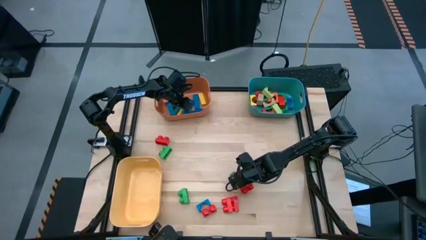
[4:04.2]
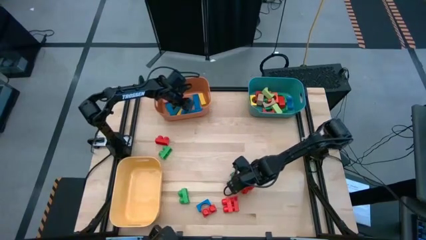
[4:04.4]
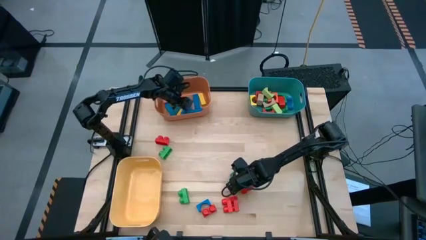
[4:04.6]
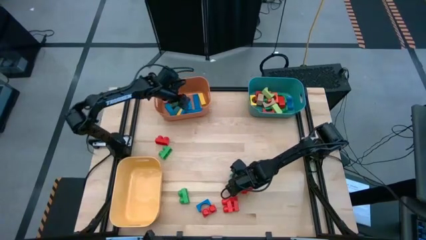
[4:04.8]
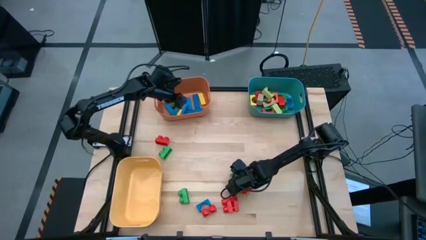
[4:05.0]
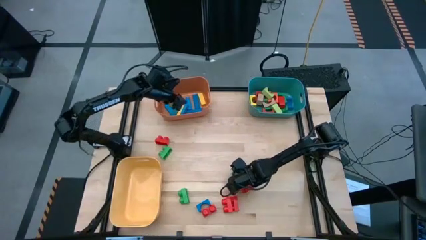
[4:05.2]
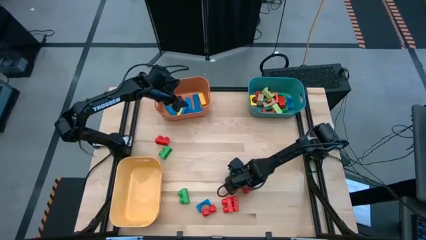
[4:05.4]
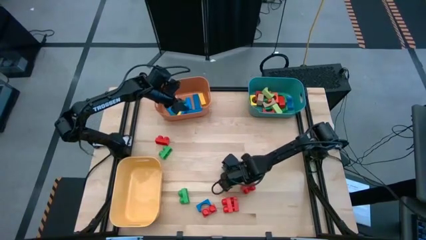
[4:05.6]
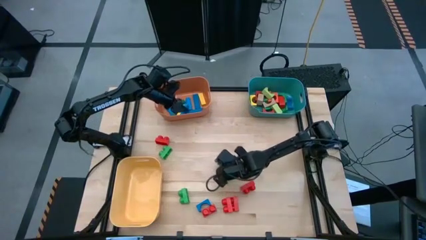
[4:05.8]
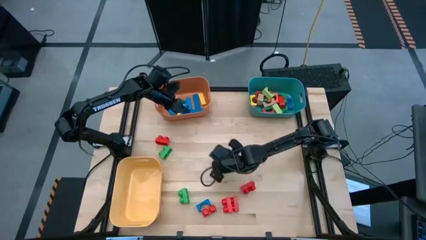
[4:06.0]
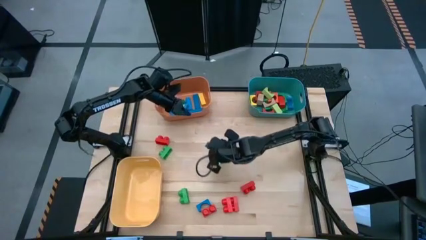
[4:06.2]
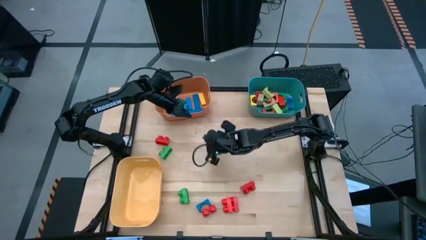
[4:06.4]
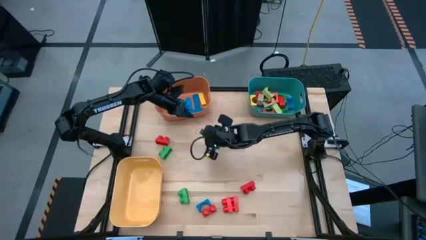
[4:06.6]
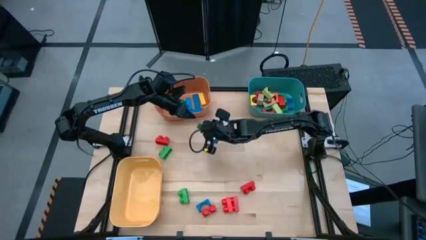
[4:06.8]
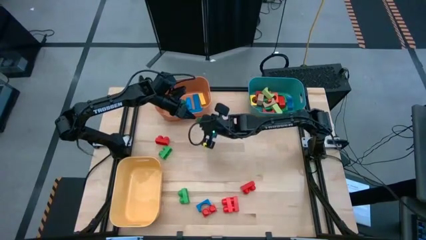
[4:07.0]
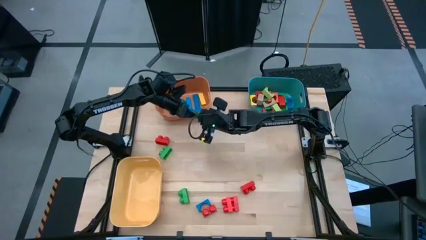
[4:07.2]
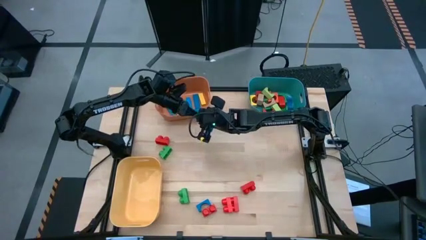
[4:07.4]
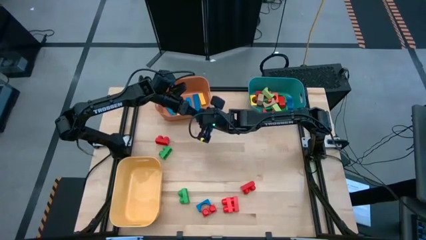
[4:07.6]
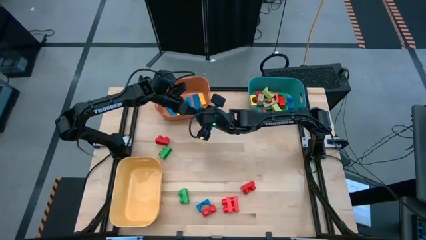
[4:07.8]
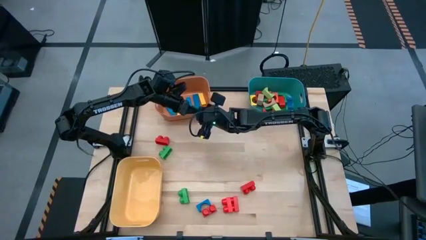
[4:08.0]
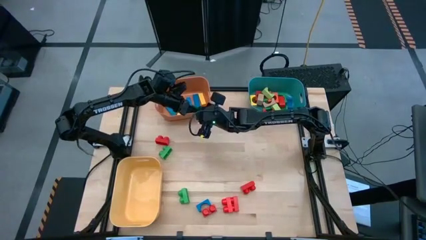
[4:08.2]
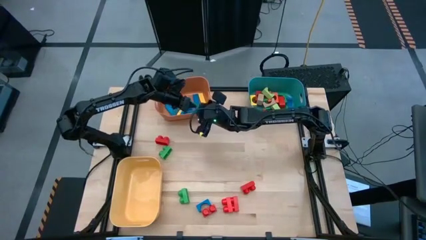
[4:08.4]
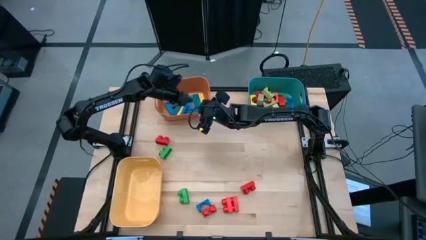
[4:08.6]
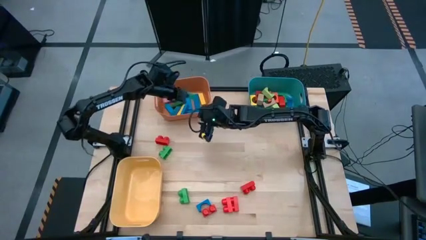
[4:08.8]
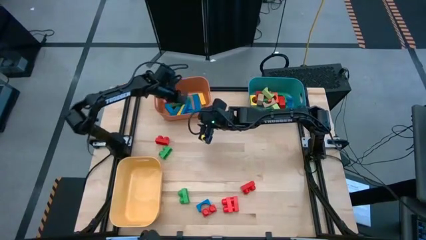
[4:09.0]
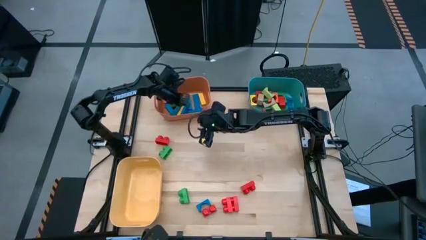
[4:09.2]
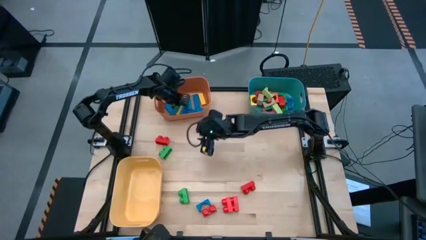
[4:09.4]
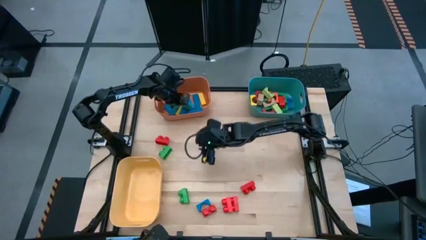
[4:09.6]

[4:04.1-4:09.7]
Task: Sort blocks by size
Put the green rectangular block into the orange bin

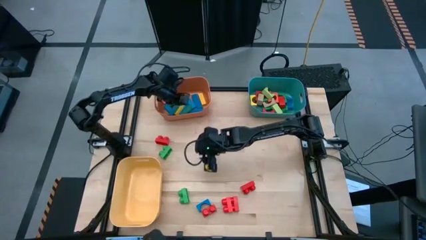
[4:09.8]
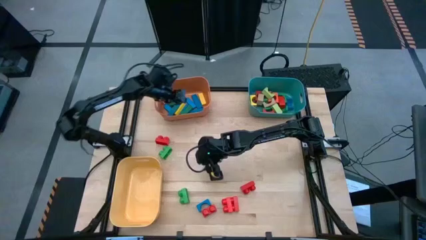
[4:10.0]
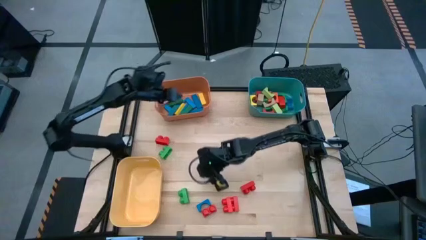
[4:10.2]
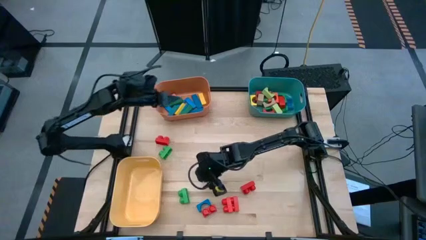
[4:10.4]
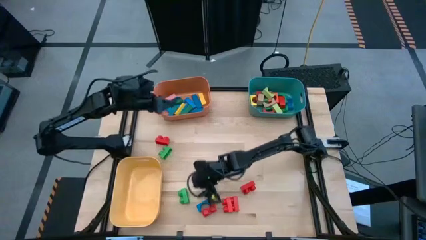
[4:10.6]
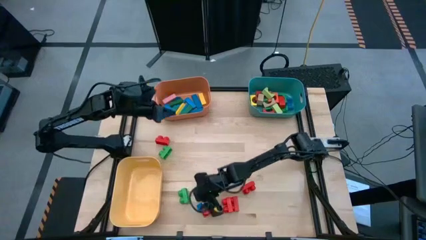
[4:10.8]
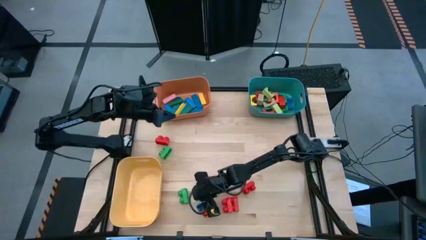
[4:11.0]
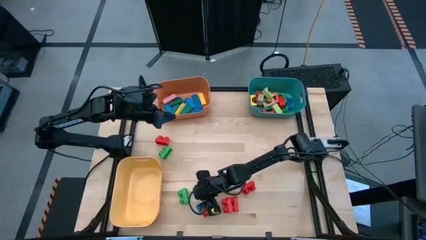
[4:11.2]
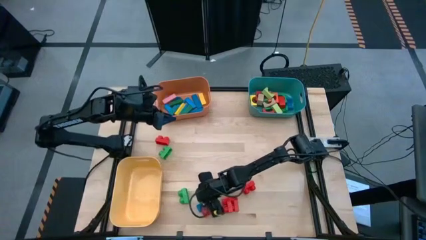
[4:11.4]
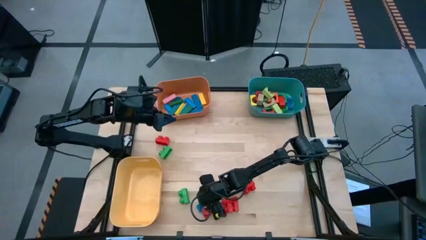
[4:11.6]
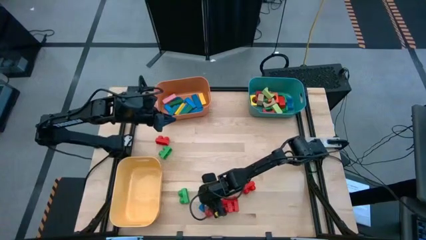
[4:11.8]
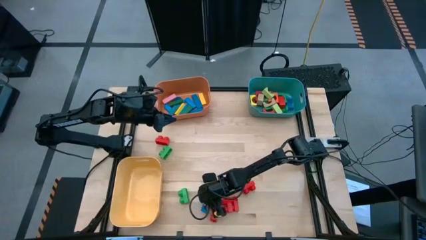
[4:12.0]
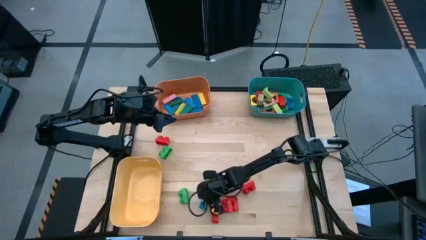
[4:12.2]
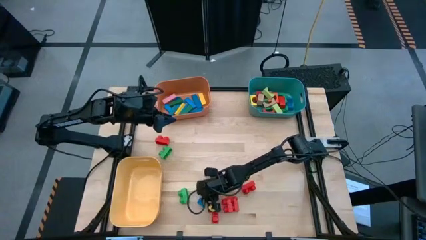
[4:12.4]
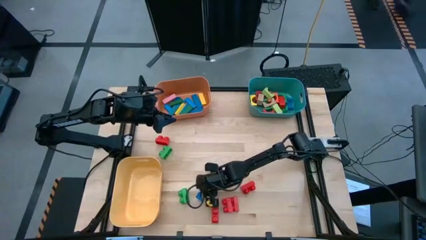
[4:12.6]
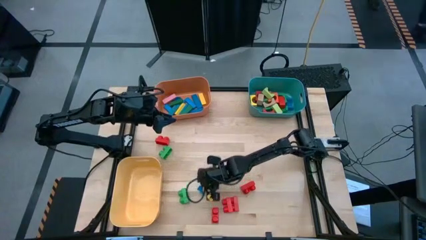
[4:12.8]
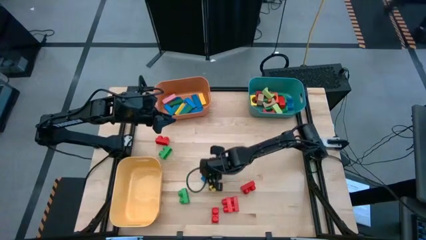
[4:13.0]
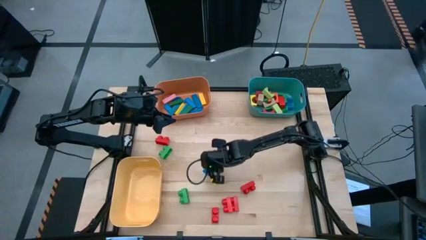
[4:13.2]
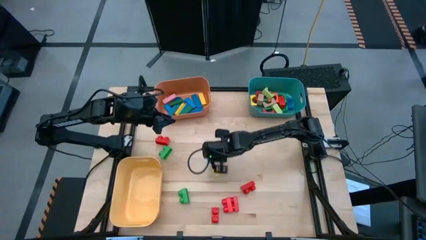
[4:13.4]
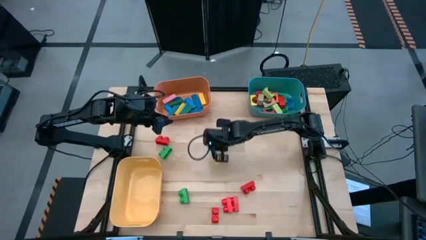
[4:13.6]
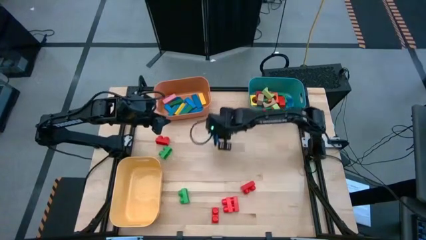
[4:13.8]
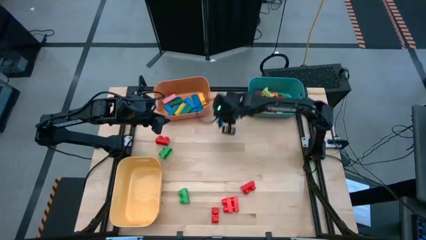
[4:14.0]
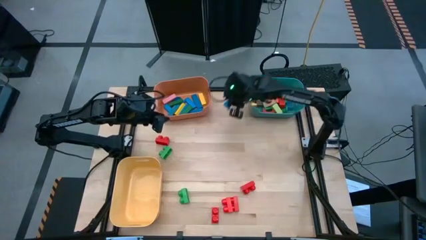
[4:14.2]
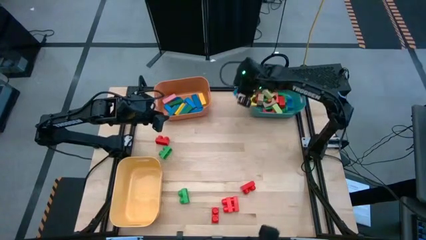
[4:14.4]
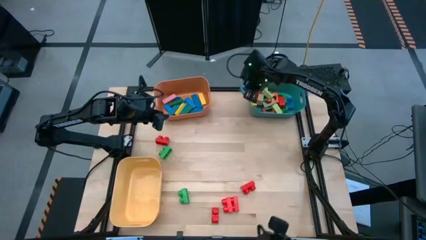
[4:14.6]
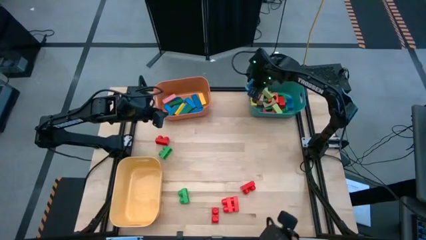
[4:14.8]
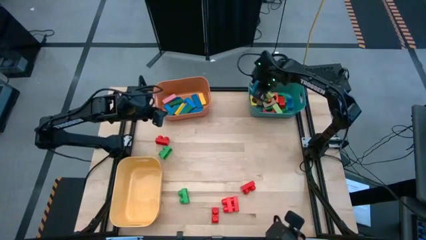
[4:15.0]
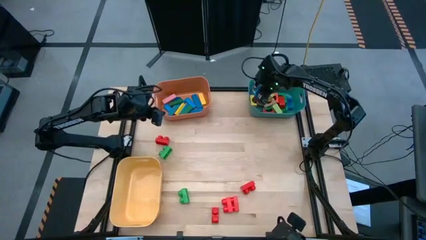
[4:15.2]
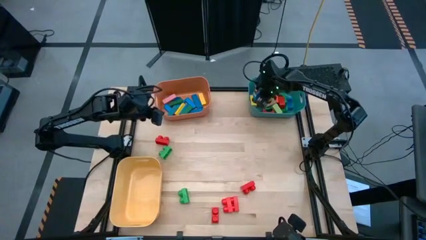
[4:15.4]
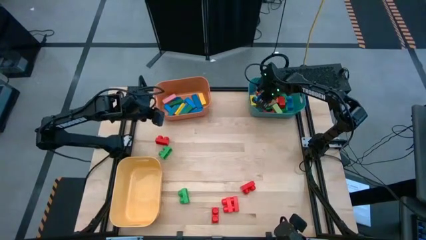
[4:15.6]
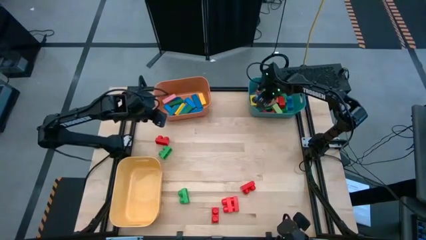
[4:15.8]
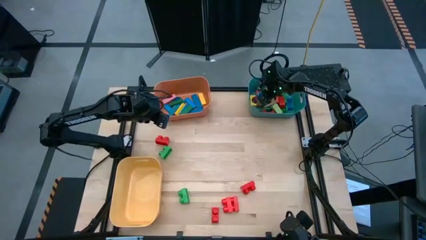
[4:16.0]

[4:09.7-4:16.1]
Put the blue arch block into the blue bin

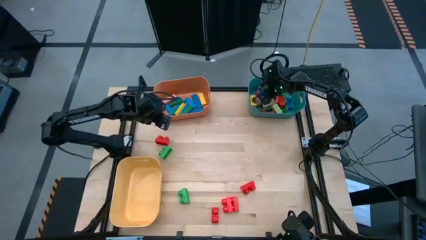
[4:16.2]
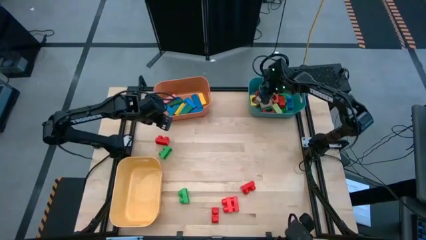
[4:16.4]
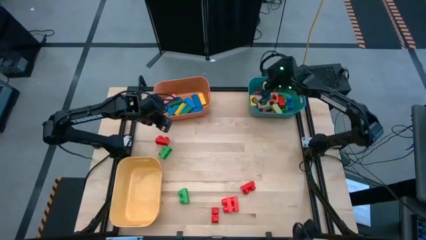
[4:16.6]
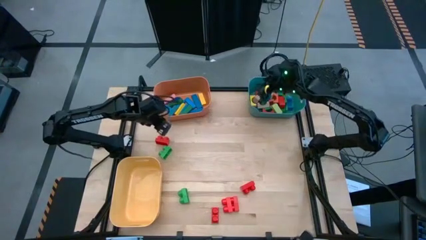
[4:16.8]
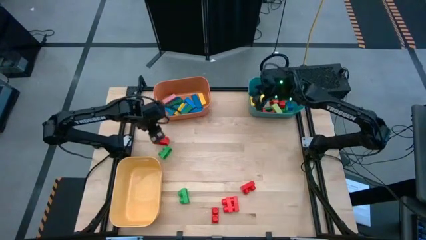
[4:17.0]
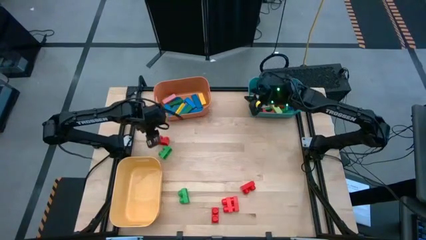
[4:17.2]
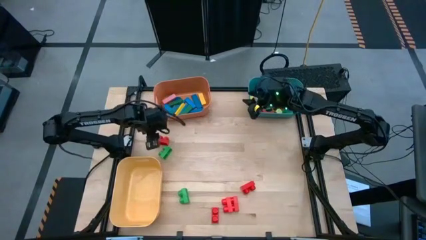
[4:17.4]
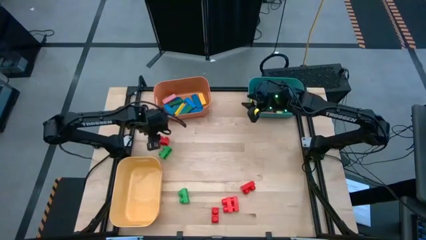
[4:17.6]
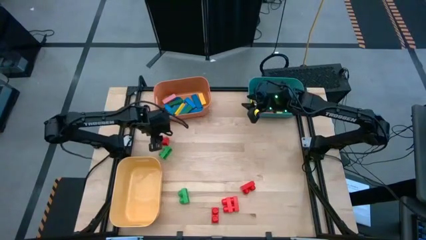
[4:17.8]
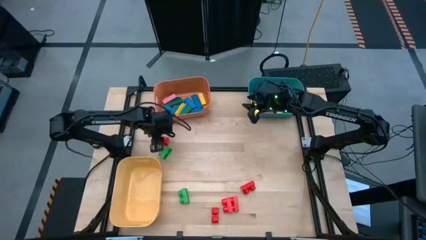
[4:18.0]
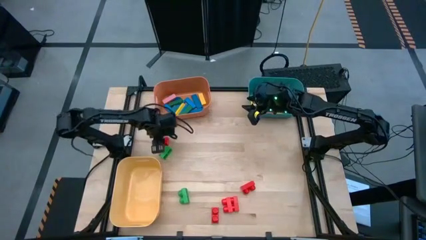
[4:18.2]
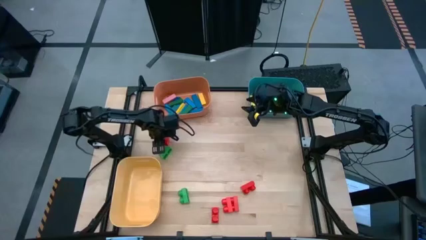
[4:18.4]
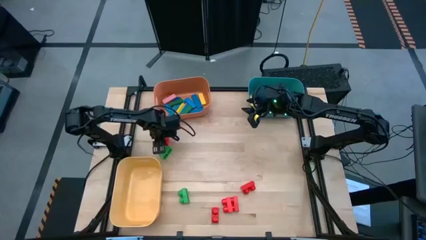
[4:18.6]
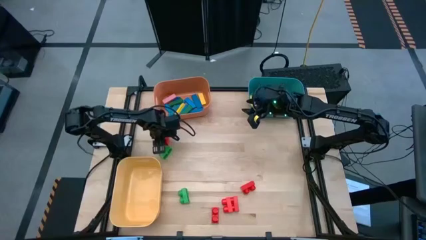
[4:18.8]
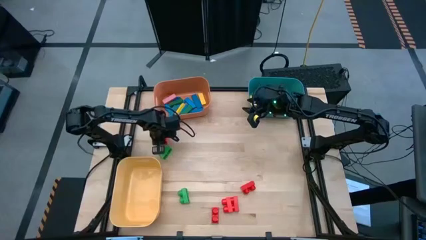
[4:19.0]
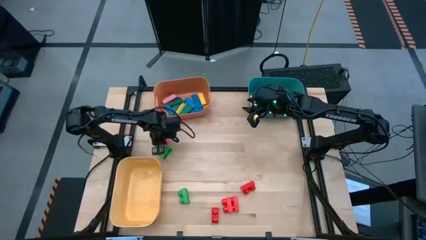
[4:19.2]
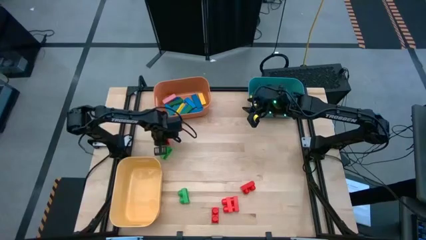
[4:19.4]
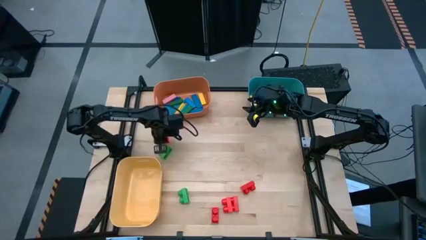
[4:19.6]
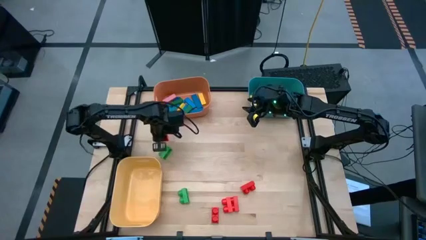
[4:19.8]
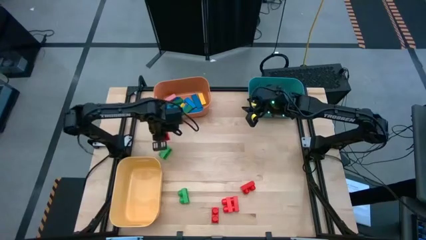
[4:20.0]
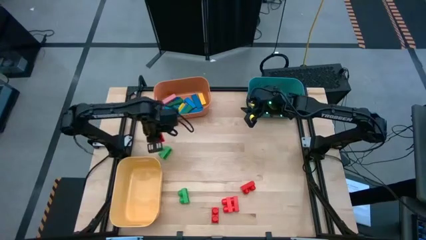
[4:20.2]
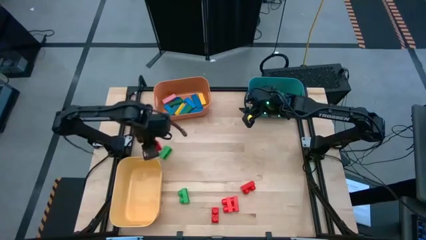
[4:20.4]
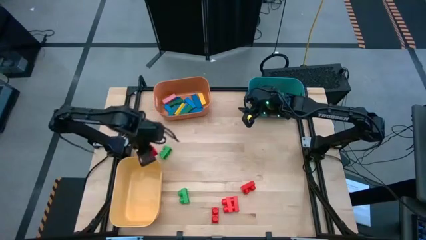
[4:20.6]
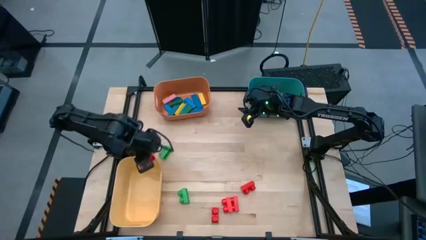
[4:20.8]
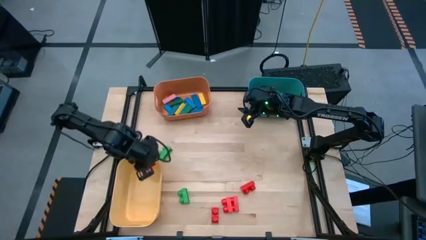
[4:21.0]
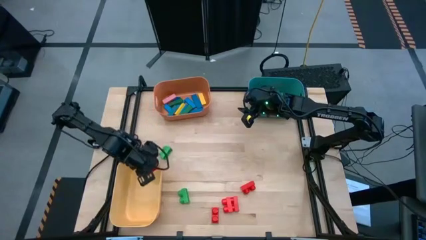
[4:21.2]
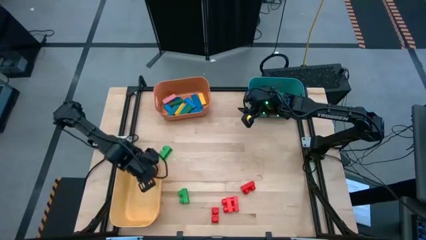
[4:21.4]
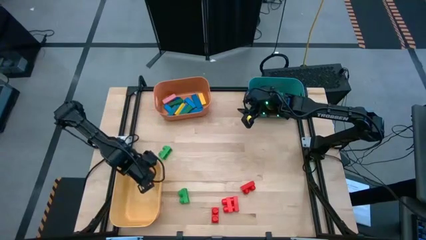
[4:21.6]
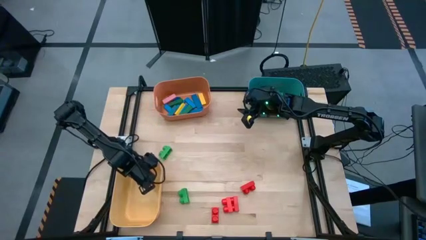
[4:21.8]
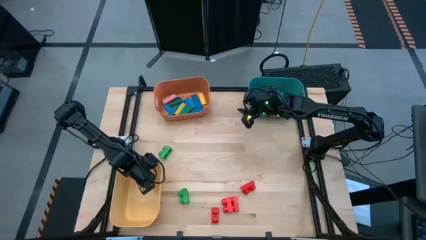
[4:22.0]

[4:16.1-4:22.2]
Put the red game piece into the yellow bin
